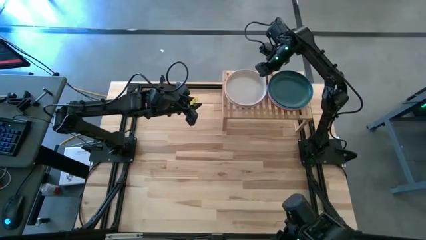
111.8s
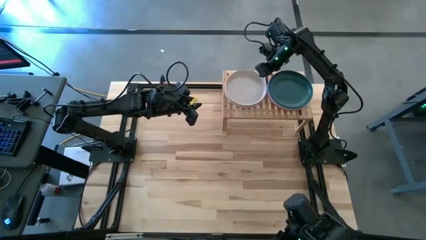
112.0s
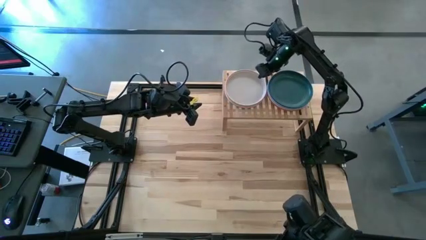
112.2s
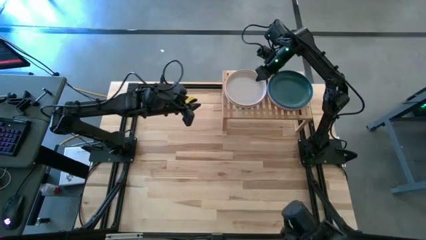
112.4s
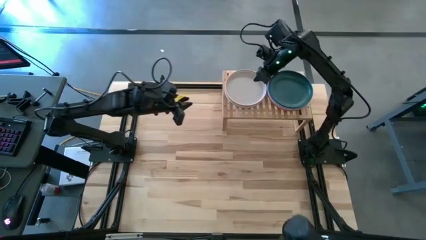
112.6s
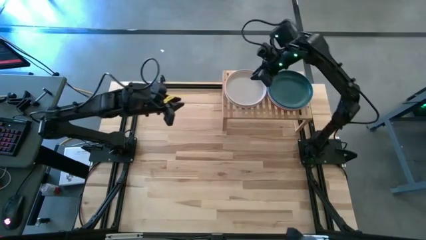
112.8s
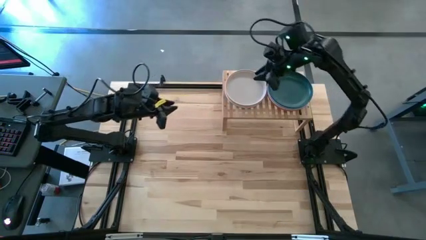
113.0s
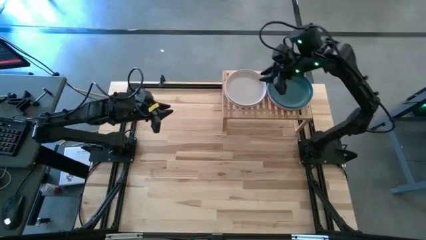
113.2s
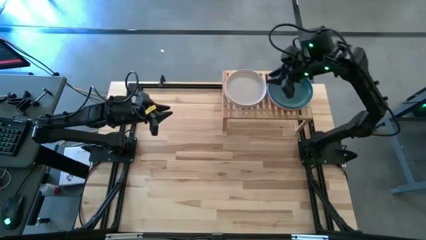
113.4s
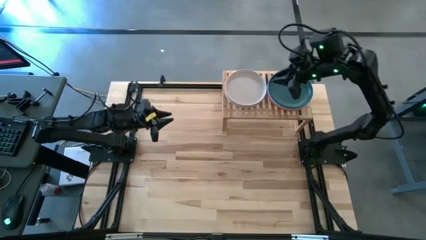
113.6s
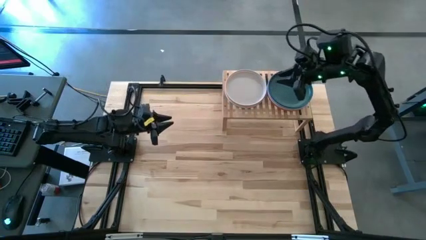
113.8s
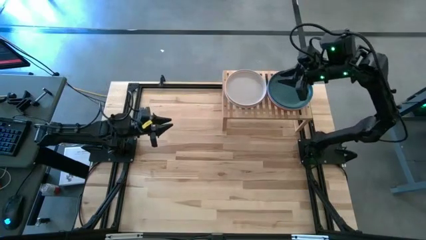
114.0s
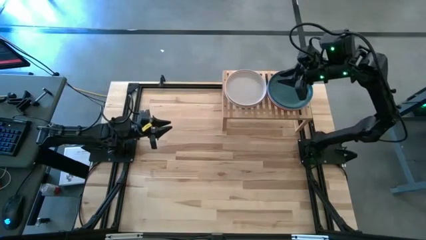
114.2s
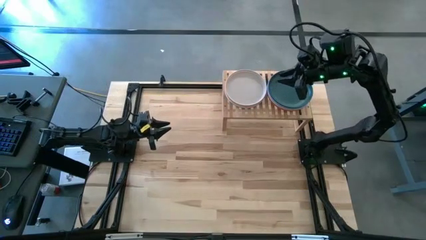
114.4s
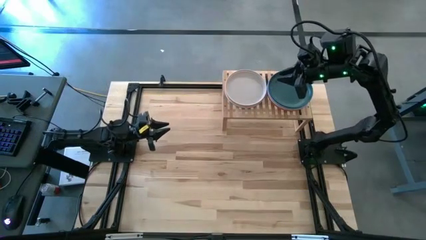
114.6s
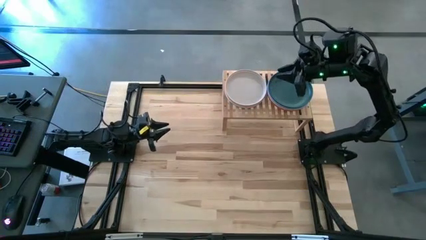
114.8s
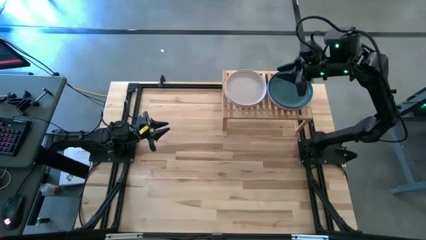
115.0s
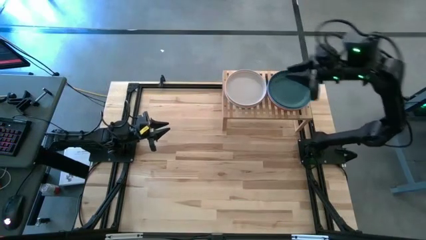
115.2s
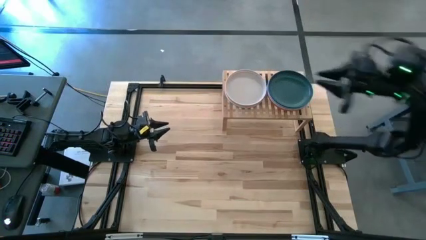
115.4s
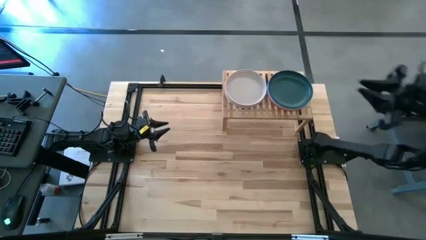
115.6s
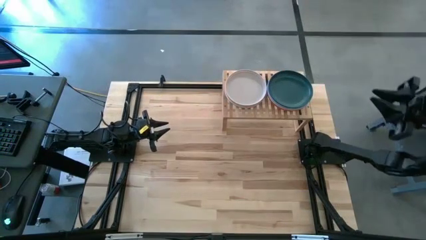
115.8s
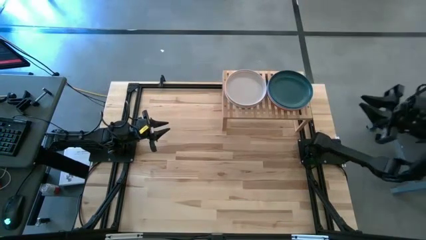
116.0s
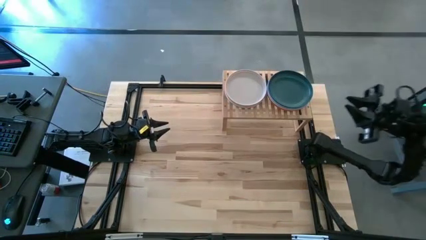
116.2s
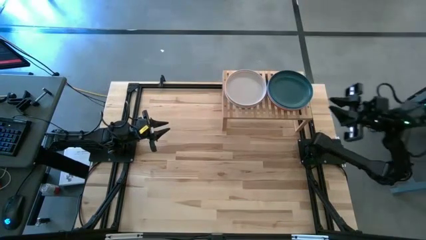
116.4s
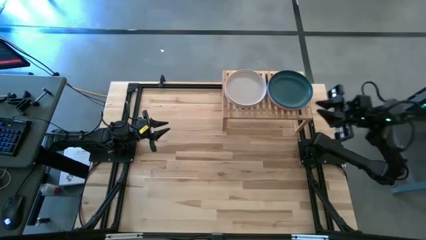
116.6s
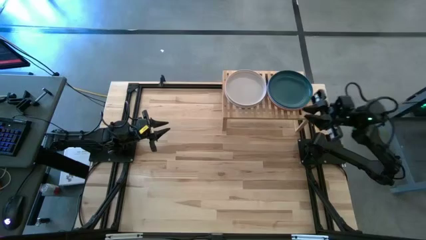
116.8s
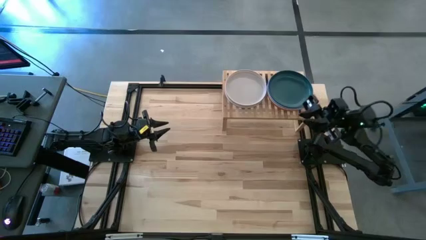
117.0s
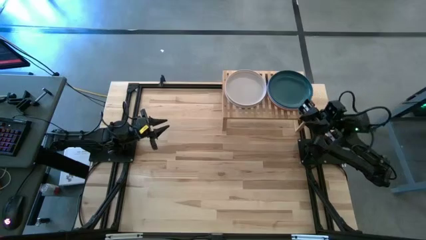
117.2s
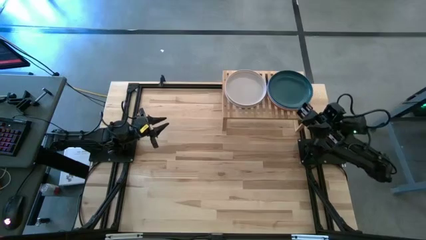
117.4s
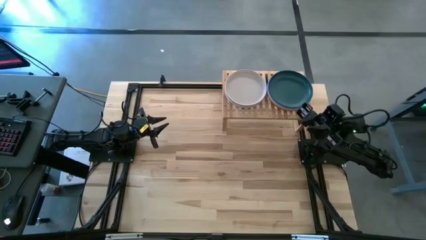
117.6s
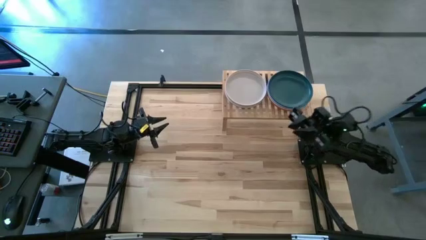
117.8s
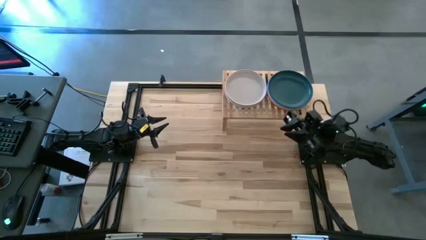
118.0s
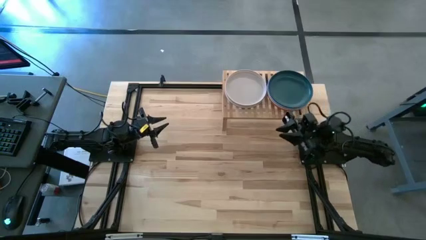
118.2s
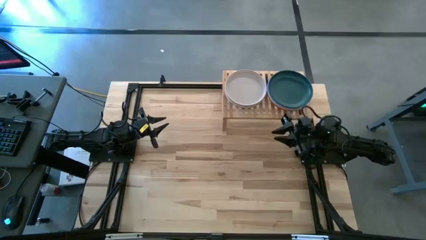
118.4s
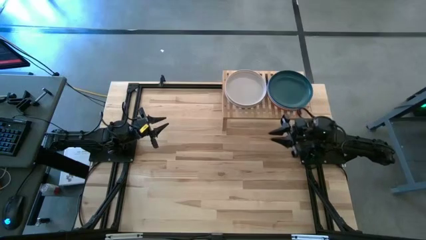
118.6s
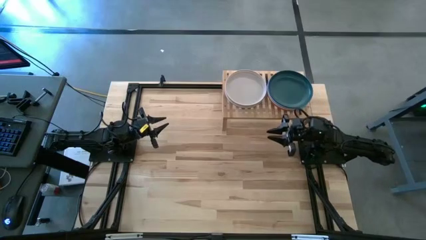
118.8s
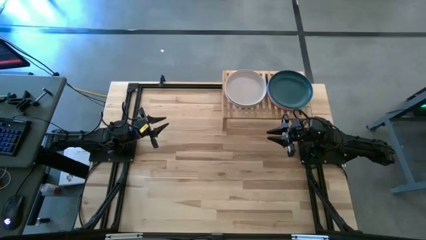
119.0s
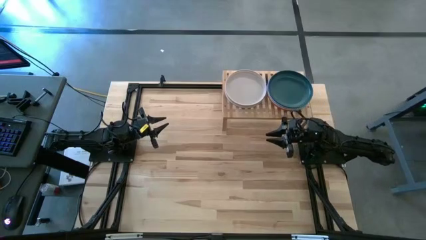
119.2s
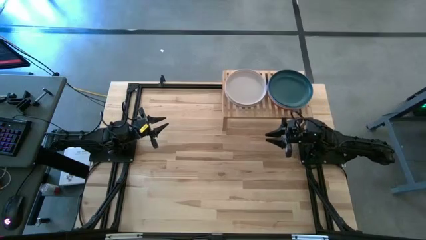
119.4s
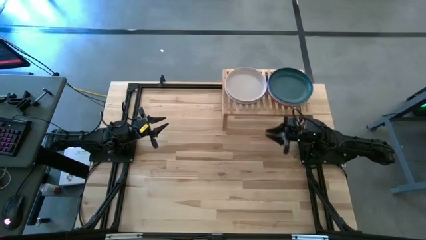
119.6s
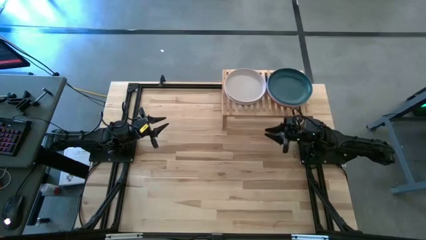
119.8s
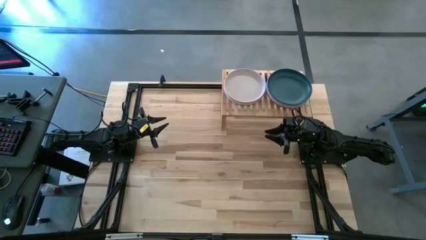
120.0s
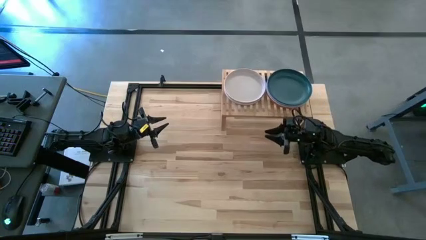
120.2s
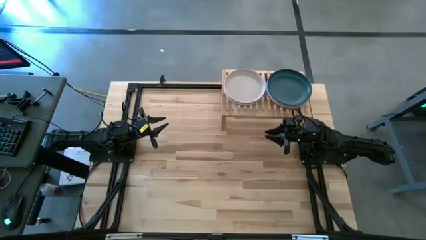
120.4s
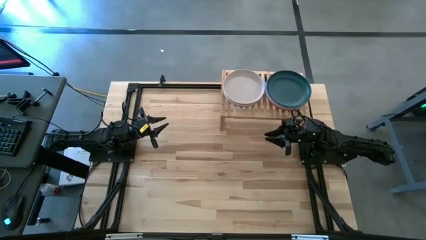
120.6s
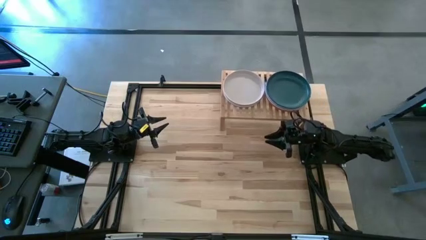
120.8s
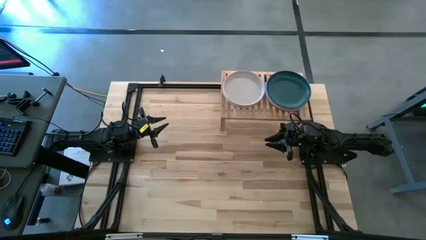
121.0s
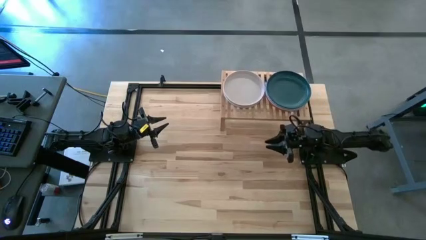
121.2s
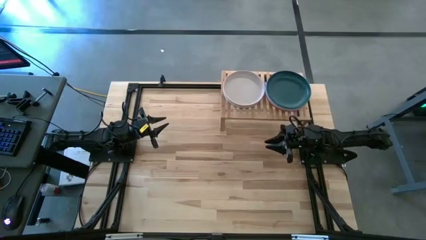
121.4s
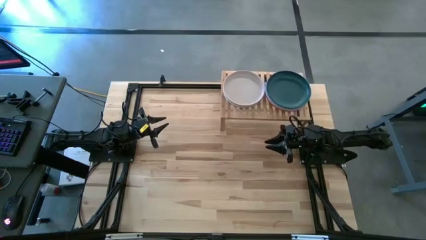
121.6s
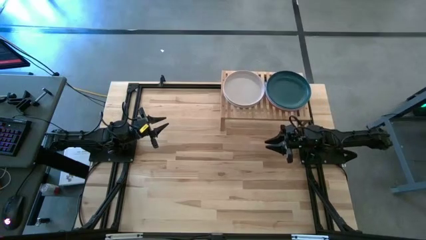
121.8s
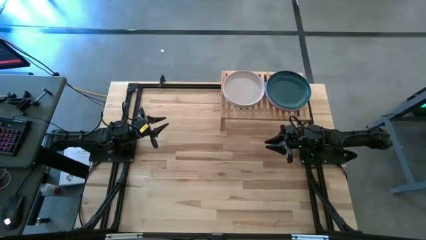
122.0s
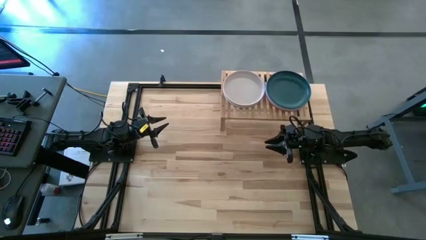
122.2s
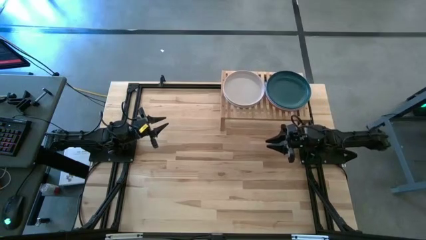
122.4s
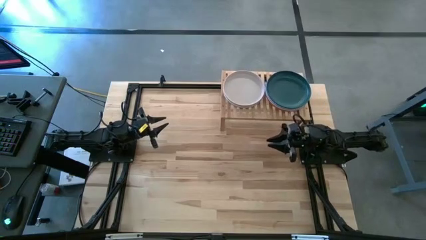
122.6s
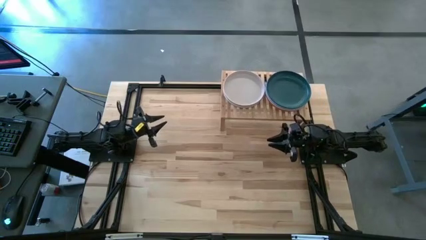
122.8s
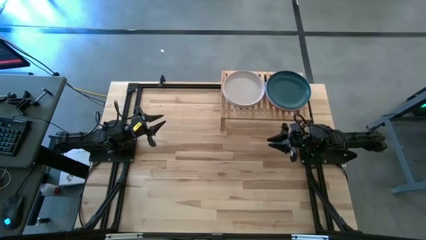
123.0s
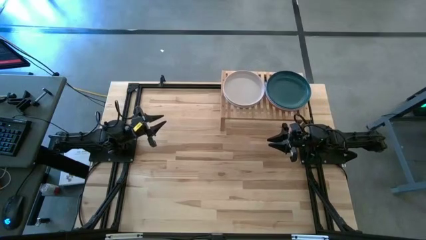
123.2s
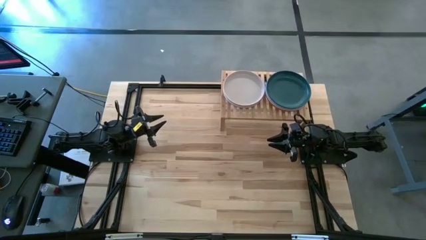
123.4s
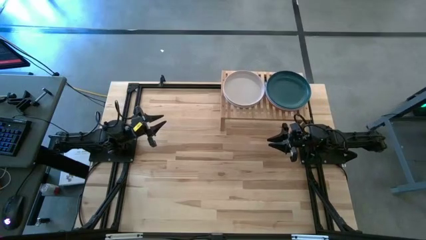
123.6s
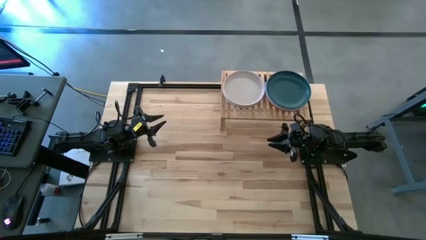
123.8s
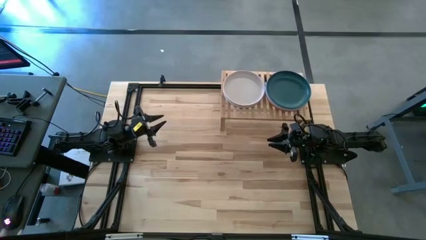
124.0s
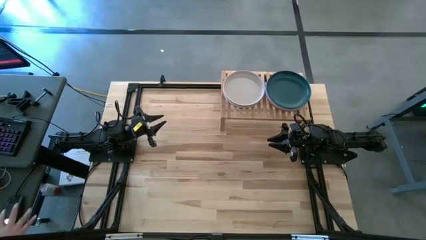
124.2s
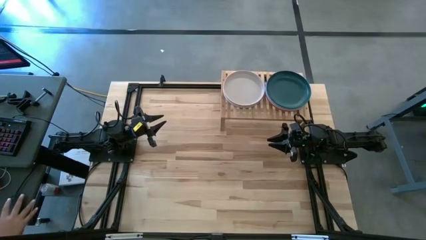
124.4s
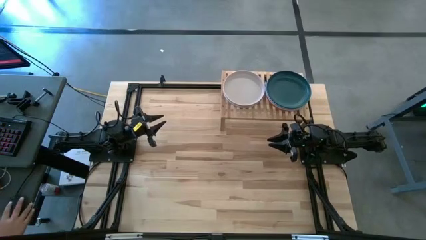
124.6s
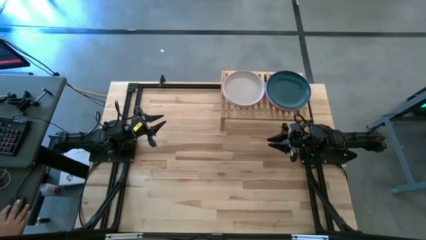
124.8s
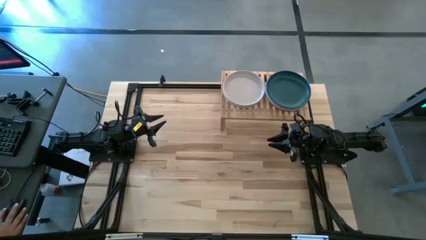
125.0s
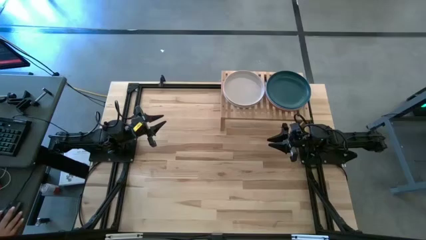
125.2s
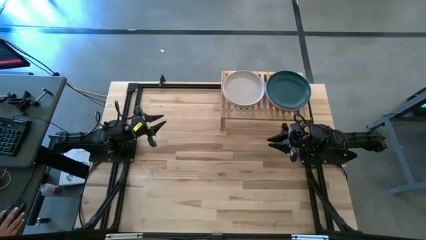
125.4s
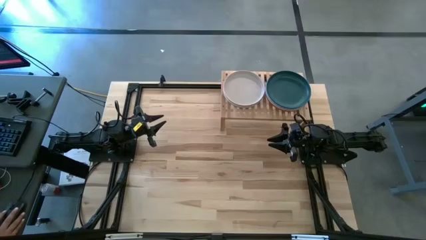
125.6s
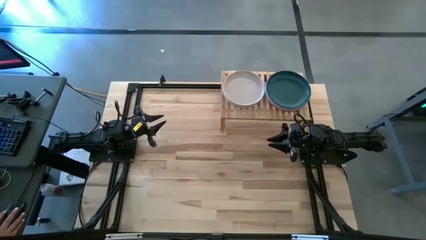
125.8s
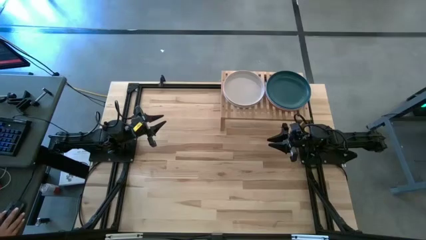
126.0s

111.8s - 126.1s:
Task: Place and stack plates onto a shelf
Return to Home Position

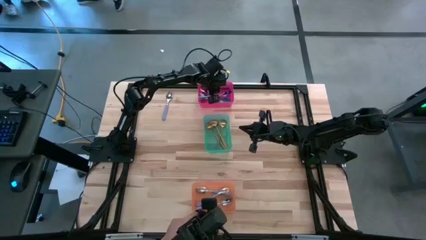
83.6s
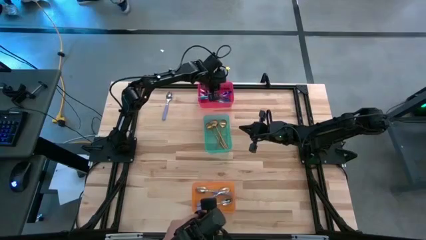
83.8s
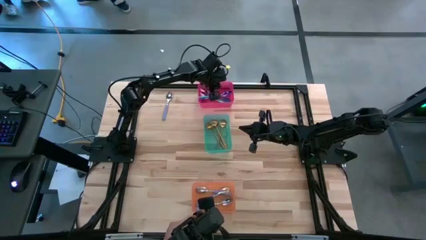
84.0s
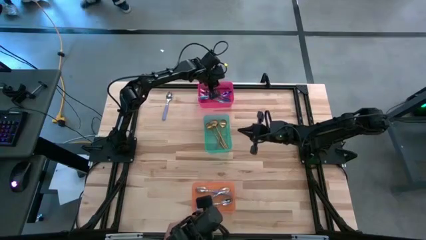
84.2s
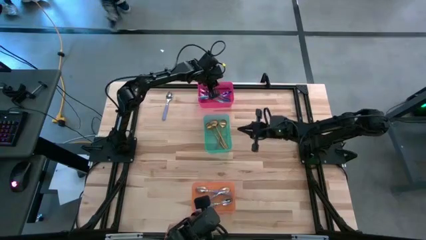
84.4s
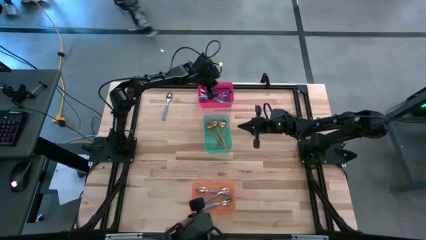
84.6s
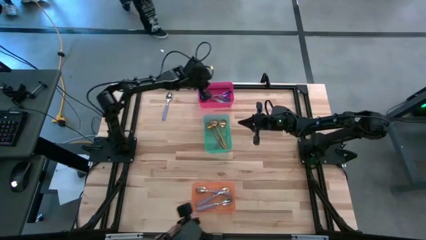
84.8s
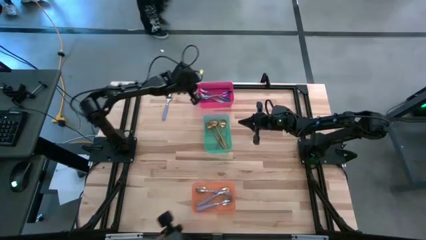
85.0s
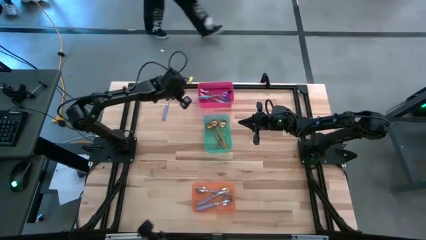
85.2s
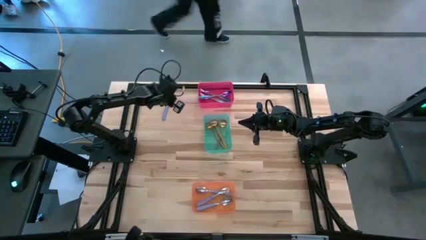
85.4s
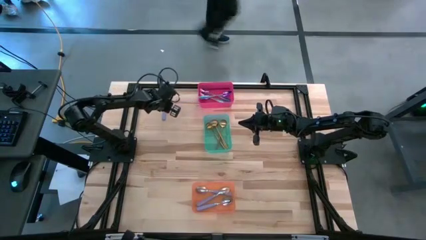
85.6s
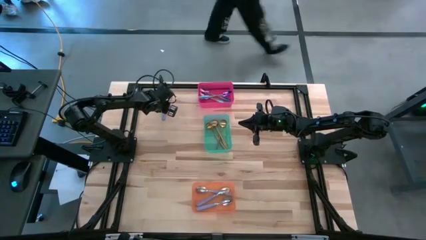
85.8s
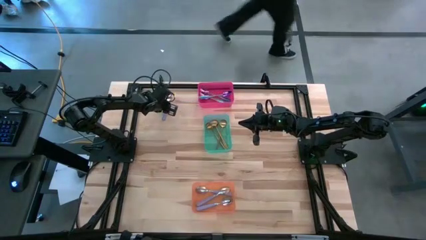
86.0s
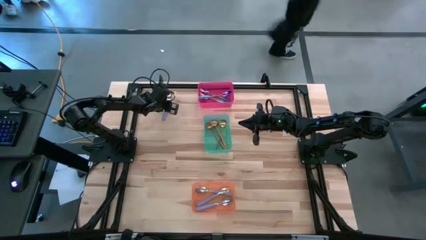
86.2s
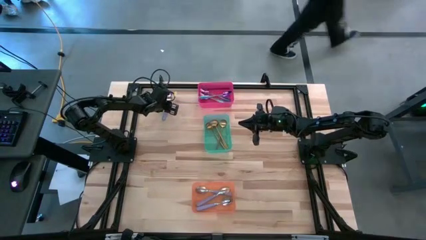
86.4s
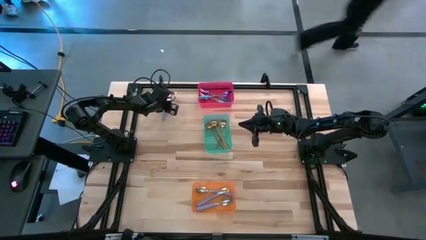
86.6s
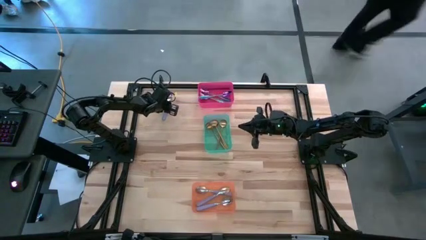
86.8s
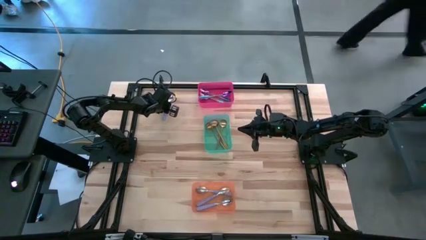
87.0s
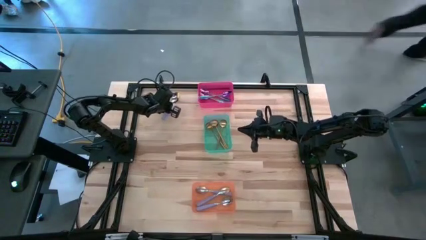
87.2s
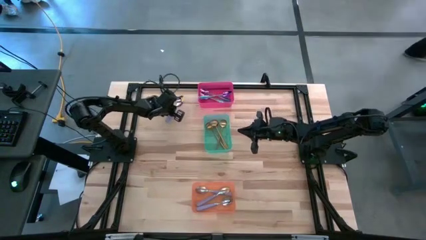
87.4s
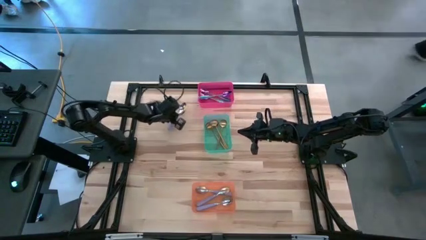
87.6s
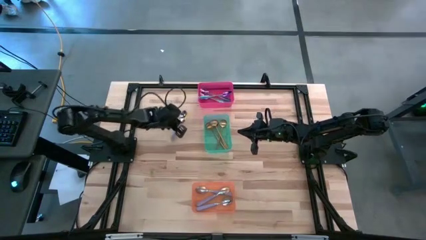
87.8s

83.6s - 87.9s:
Task: Sort silverware by color (type)
Put the purple spoon into the orange bin
